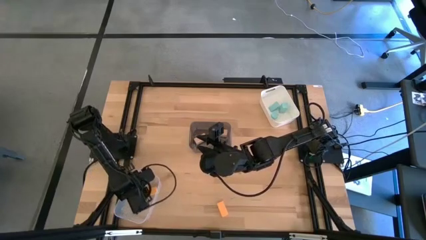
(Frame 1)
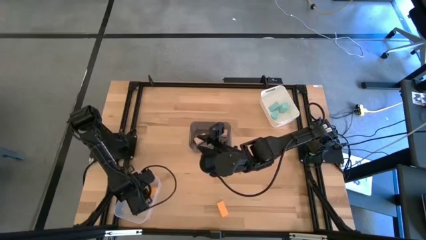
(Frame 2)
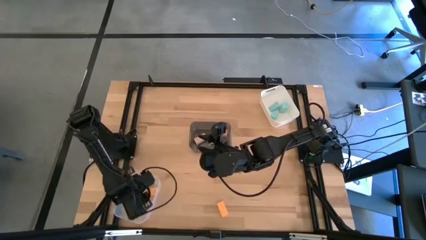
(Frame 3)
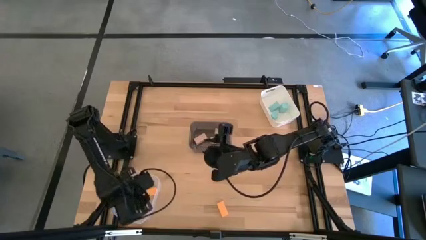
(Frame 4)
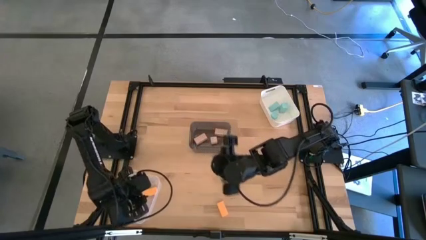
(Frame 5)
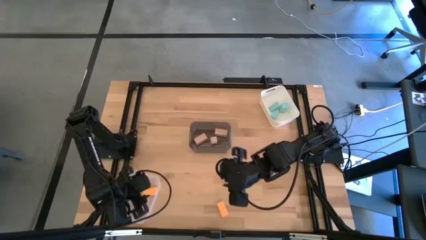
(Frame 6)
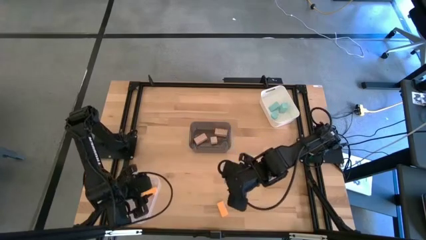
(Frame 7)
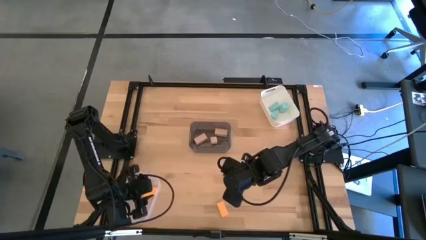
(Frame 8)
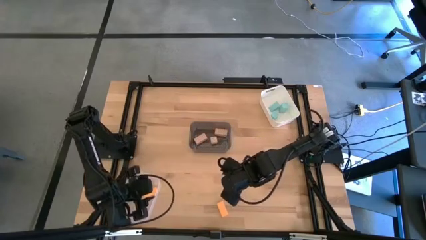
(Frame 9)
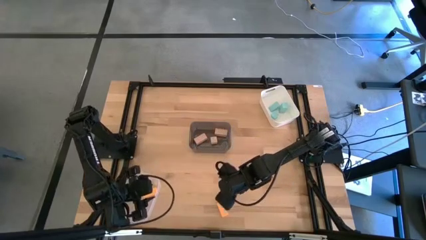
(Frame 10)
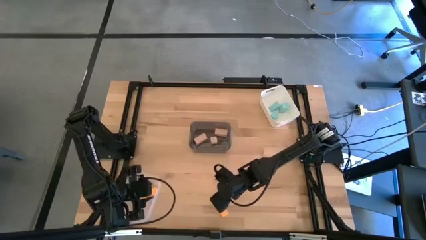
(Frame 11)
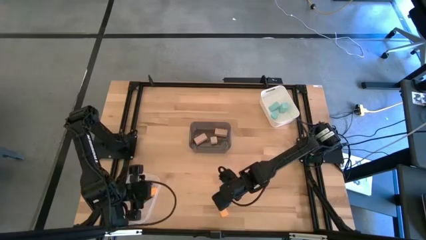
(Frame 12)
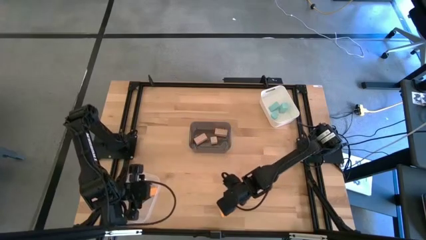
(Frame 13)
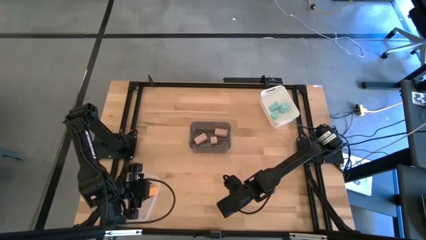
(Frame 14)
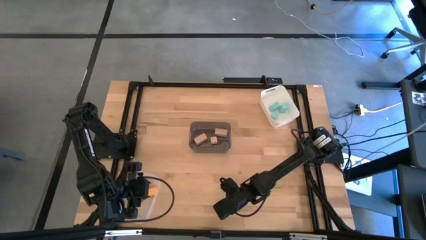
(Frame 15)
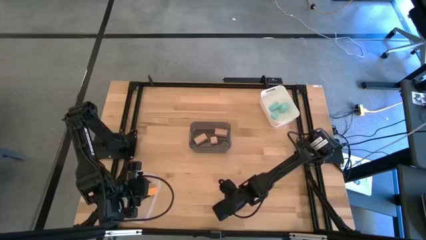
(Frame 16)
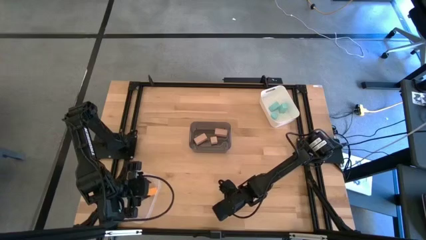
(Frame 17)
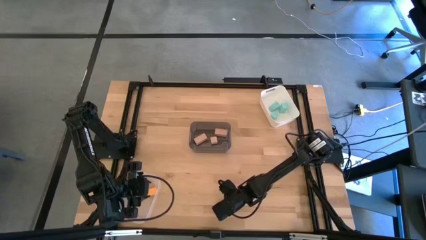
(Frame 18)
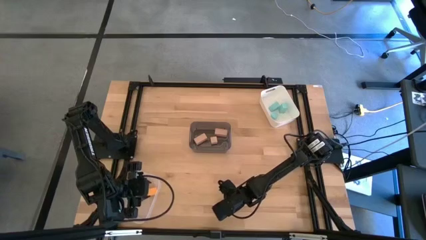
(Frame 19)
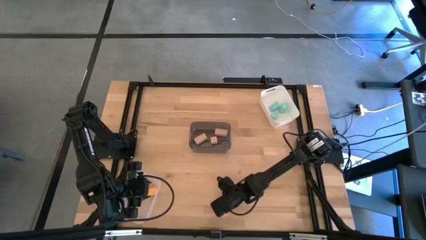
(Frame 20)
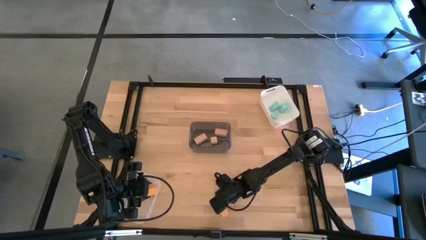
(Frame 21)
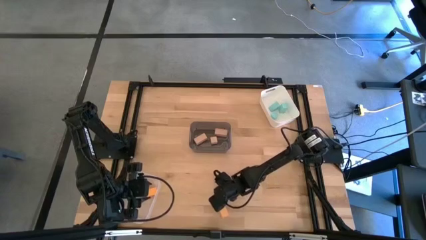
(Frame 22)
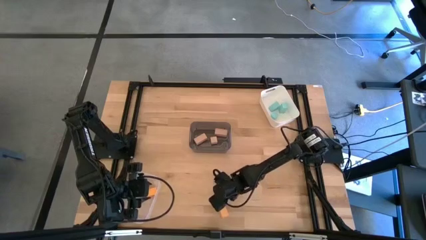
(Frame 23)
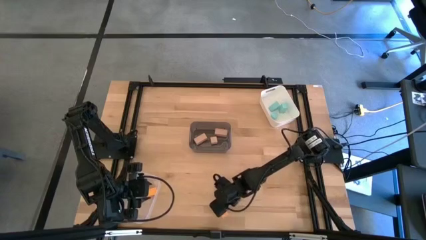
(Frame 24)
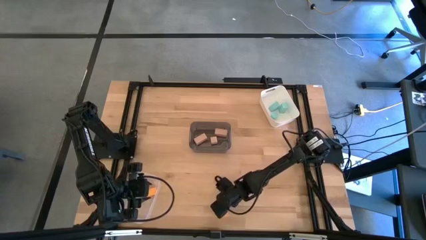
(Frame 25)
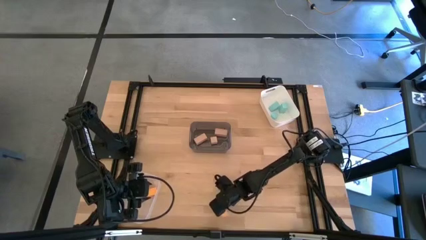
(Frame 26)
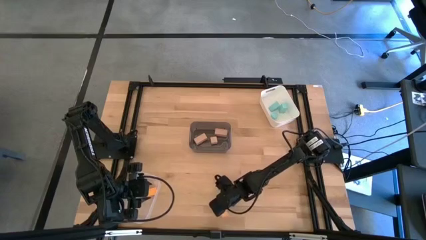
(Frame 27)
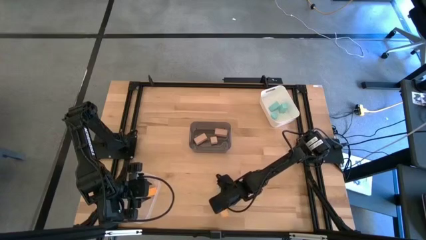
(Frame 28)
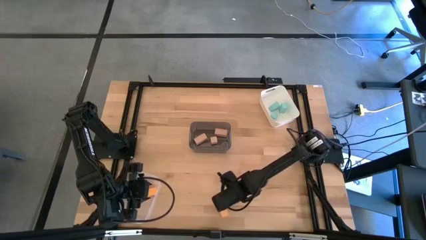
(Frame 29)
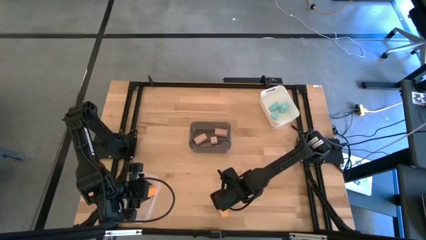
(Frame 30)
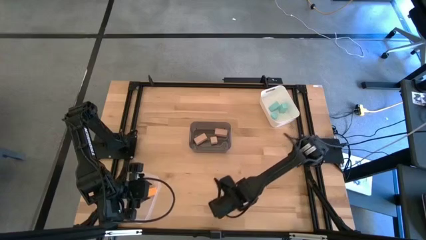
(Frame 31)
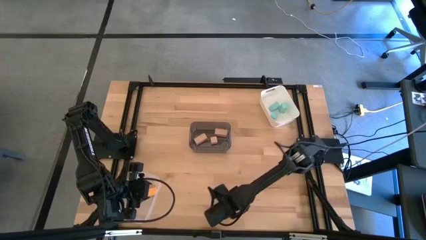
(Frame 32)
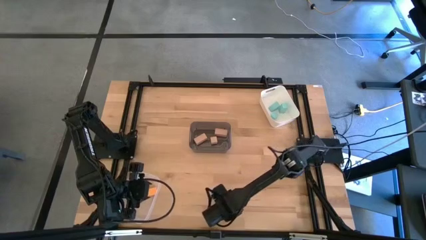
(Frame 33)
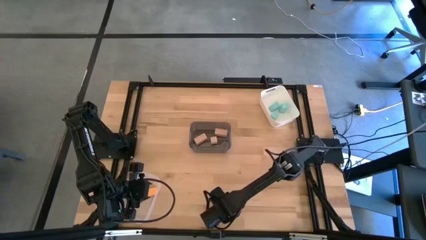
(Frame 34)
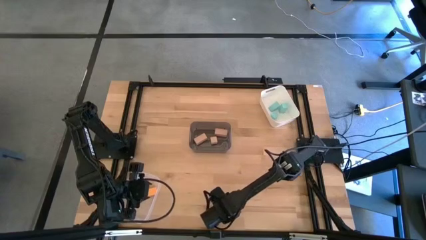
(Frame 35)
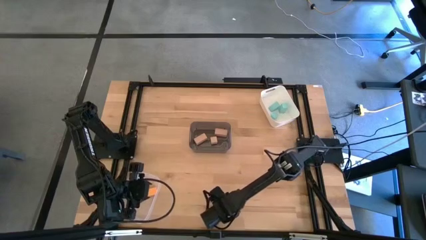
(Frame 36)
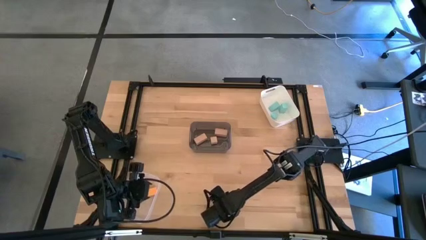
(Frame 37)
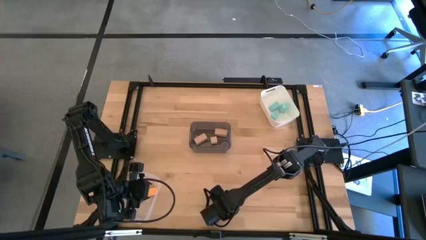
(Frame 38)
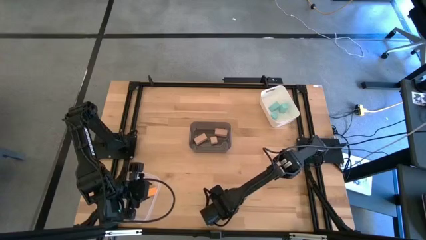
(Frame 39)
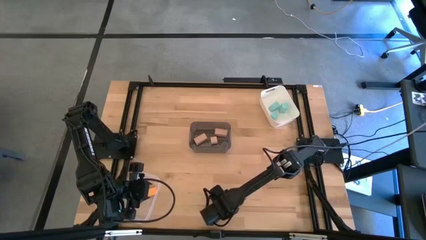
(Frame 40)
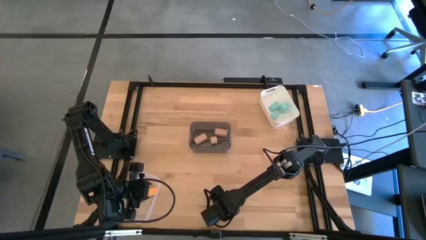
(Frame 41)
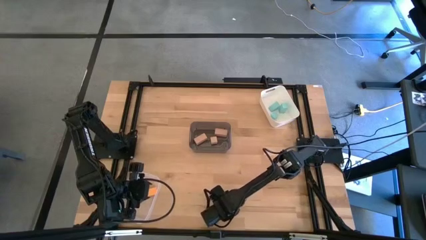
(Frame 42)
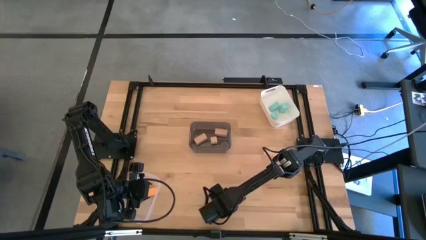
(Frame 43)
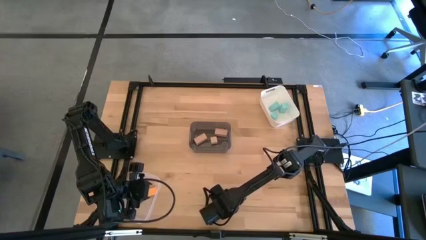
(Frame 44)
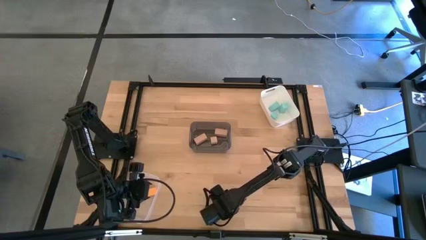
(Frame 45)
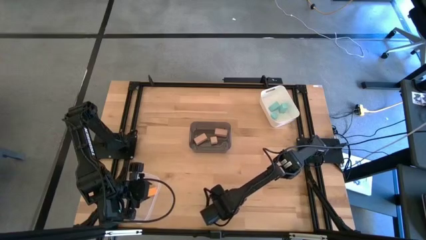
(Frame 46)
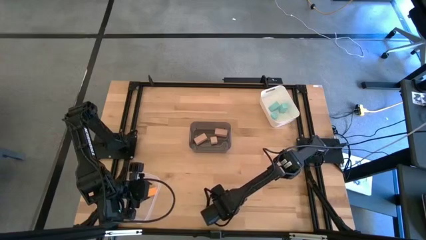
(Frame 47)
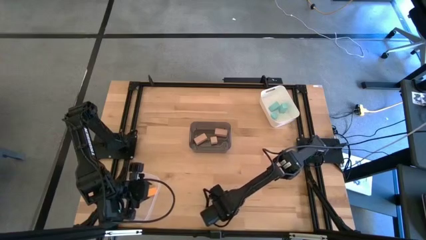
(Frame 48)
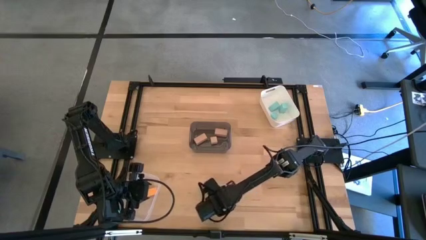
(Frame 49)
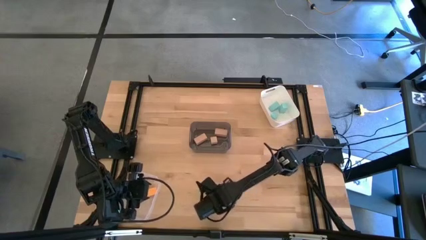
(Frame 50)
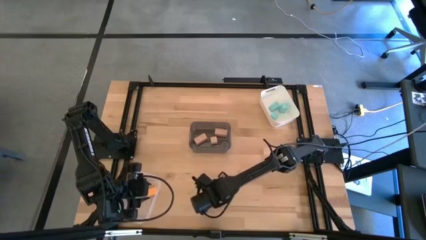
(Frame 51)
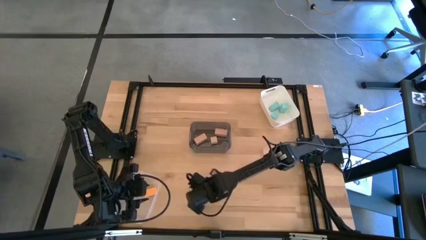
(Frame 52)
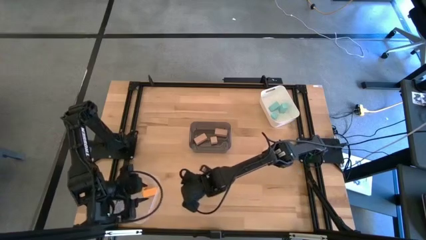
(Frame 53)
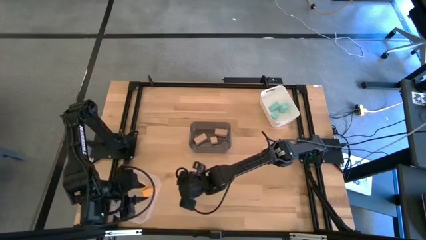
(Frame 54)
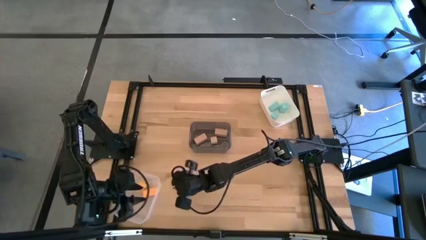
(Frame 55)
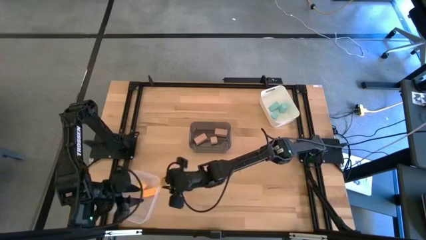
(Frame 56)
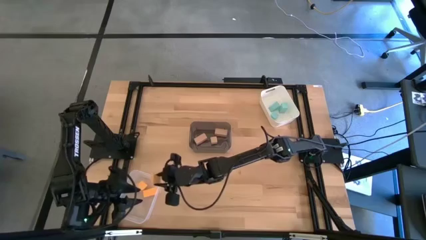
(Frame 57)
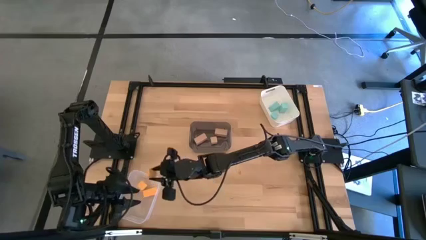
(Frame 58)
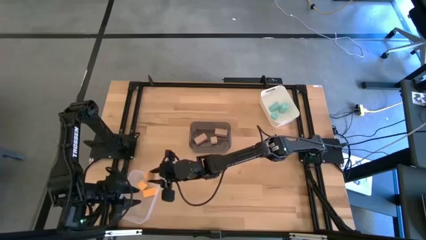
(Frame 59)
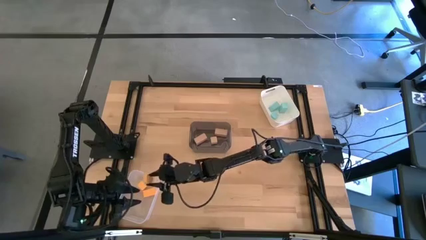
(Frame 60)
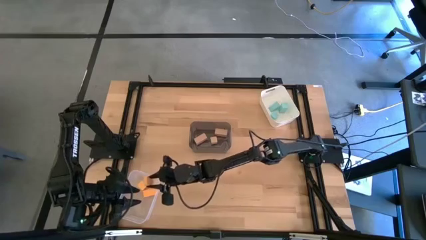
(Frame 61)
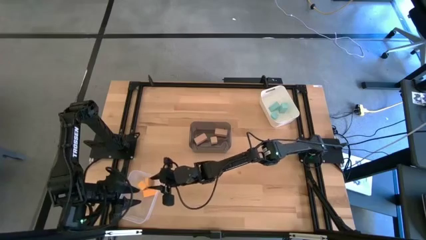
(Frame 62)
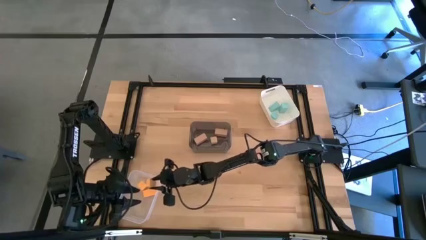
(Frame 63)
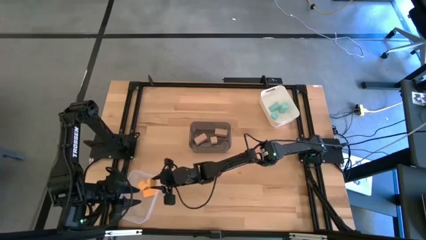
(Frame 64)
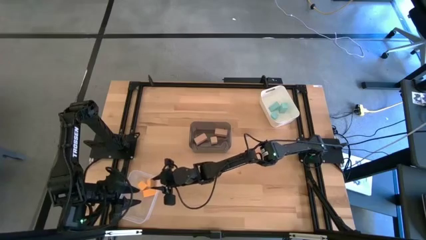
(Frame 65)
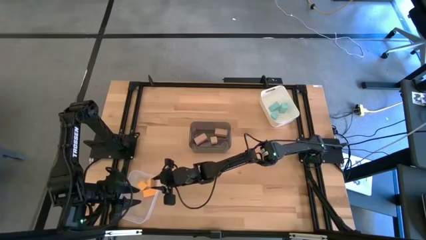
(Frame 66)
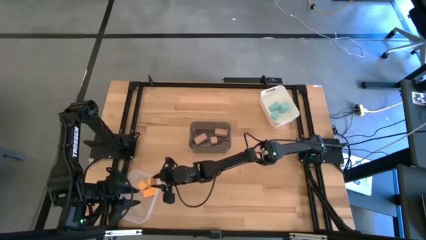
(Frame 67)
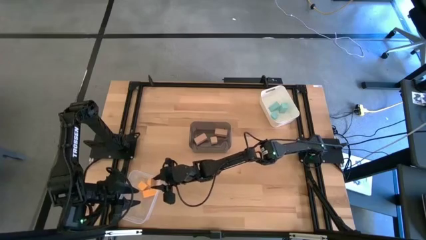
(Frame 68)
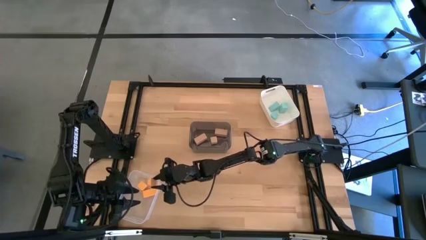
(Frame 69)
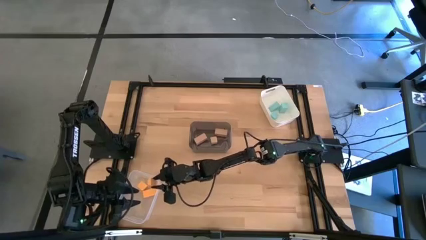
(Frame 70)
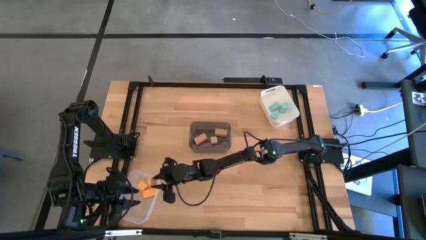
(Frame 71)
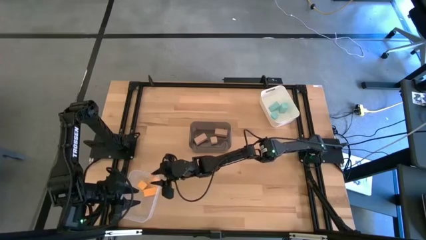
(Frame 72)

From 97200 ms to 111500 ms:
Task: Sort & place blocks by color
Put the yellow block into the transparent bin
